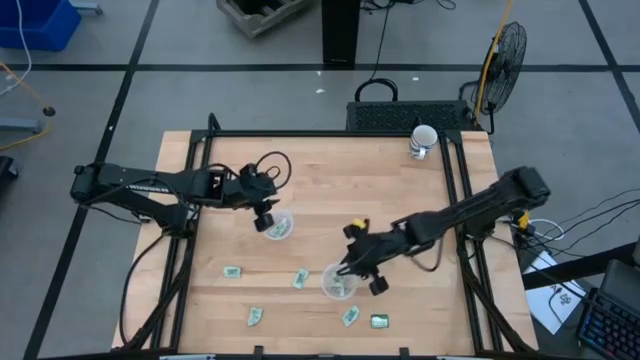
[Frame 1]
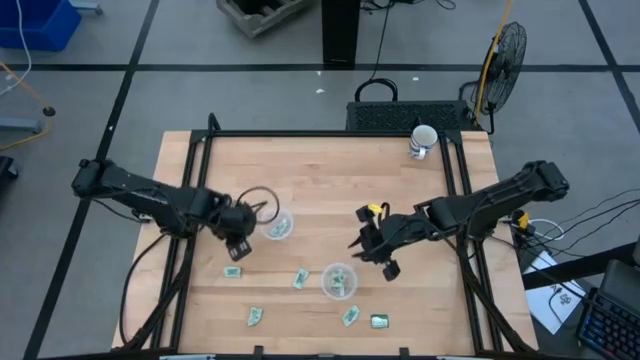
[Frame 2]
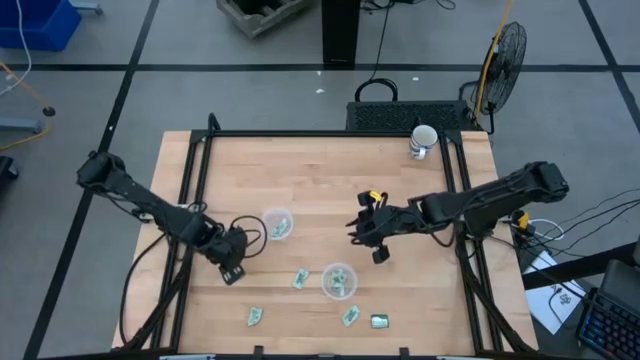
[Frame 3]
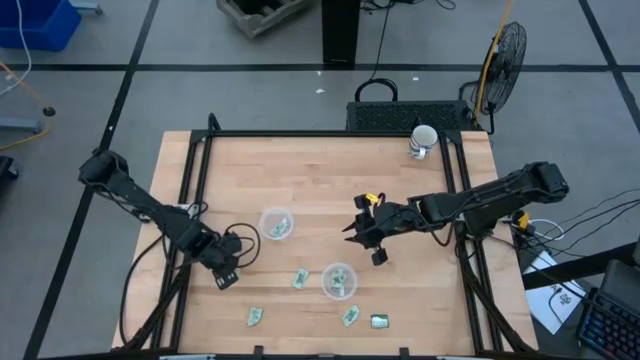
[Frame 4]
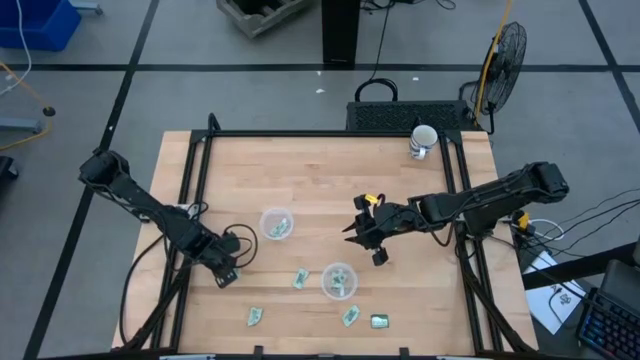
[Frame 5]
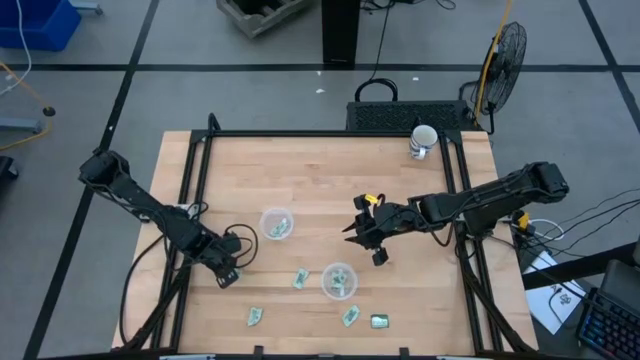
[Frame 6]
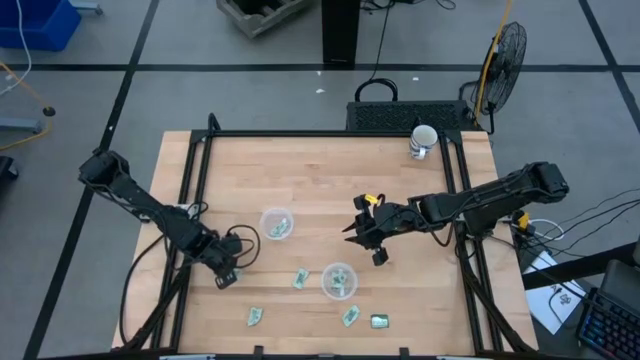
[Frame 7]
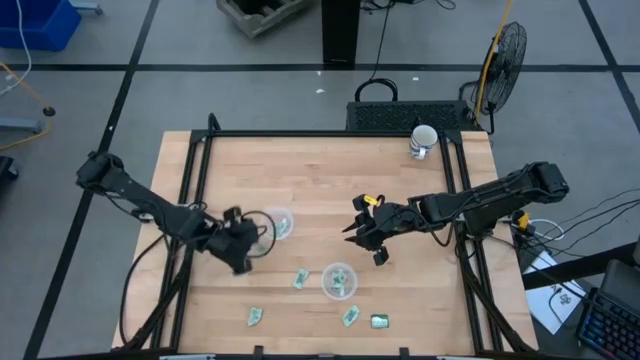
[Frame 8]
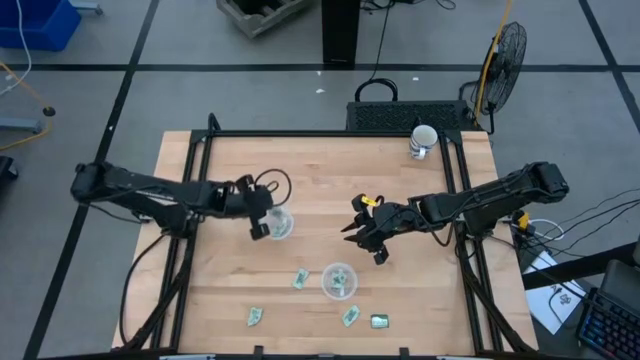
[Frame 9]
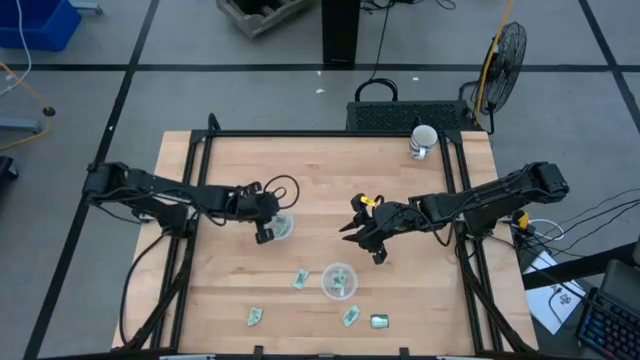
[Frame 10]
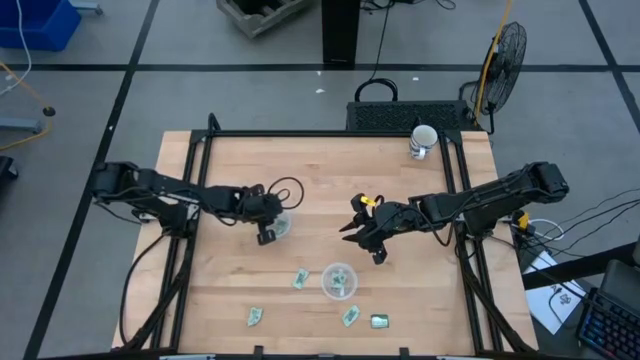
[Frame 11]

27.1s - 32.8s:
Task: Pick and place items into bin
Put the white stevia packet into the top transparent bin

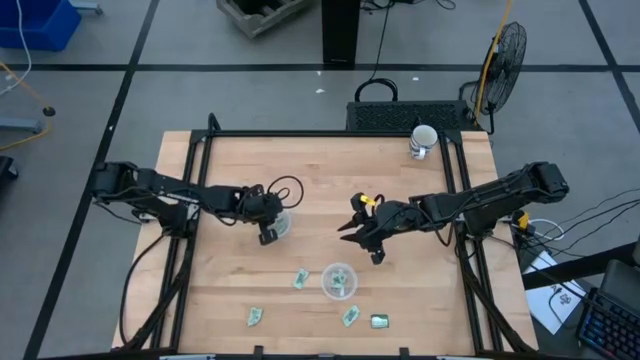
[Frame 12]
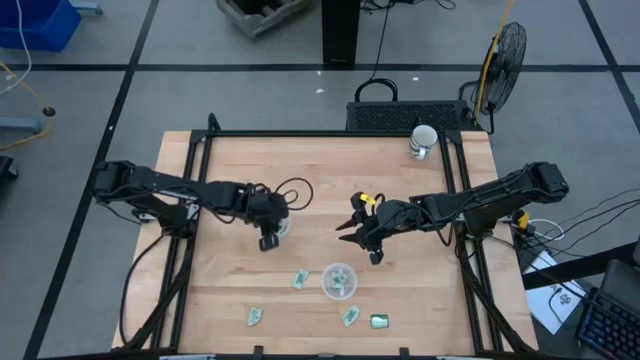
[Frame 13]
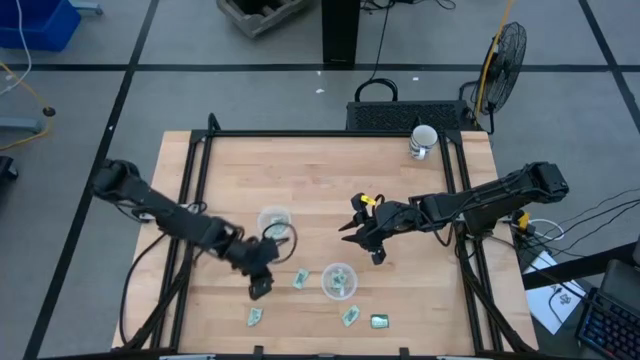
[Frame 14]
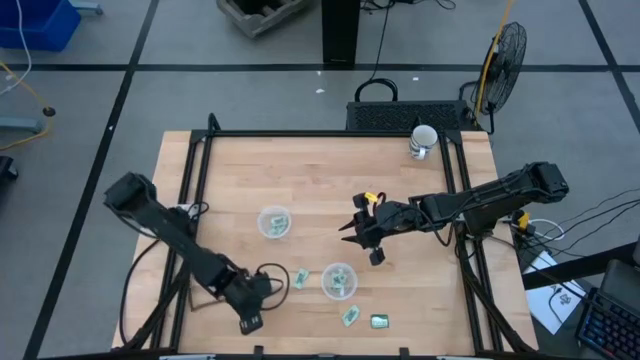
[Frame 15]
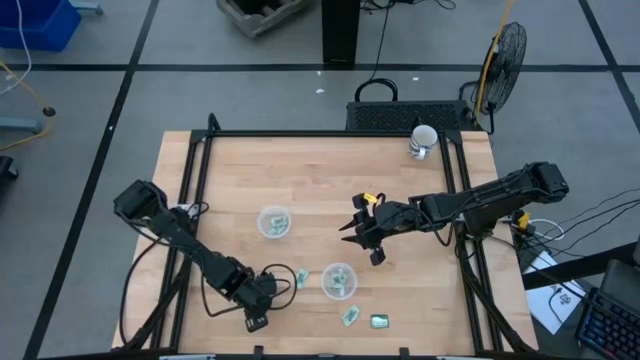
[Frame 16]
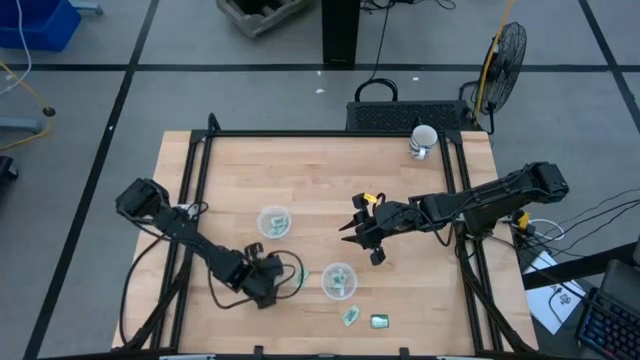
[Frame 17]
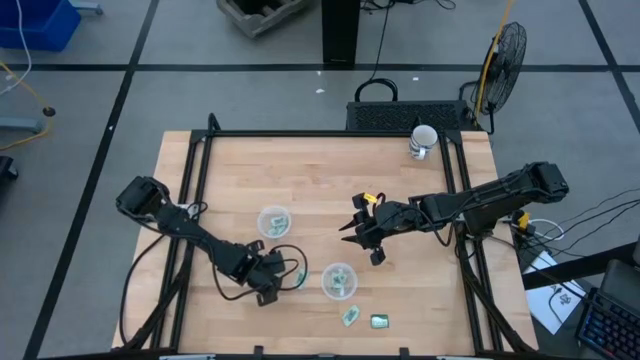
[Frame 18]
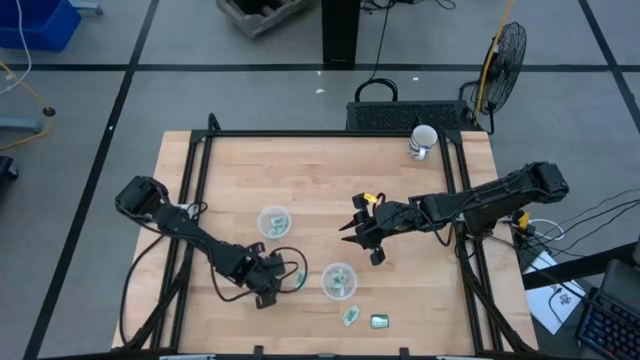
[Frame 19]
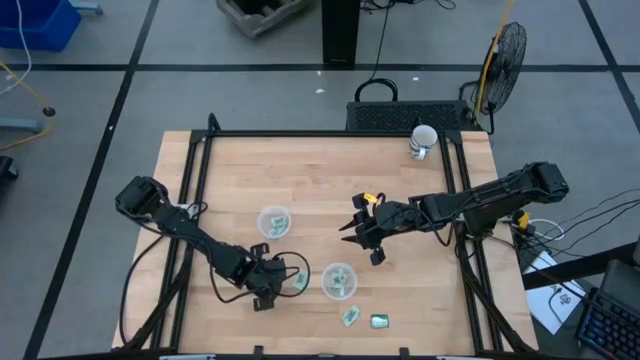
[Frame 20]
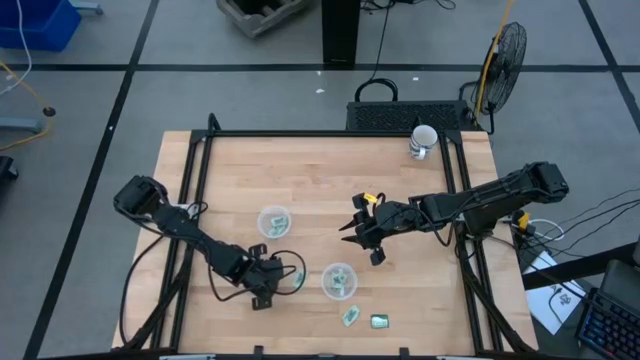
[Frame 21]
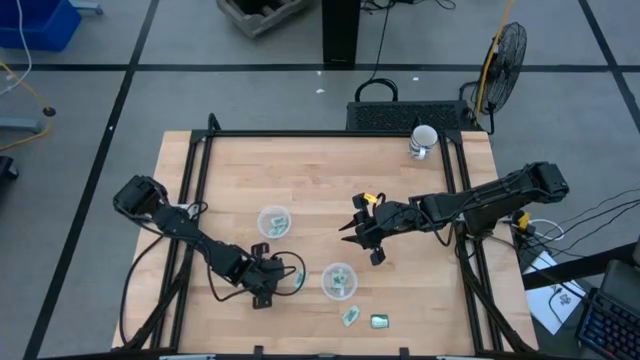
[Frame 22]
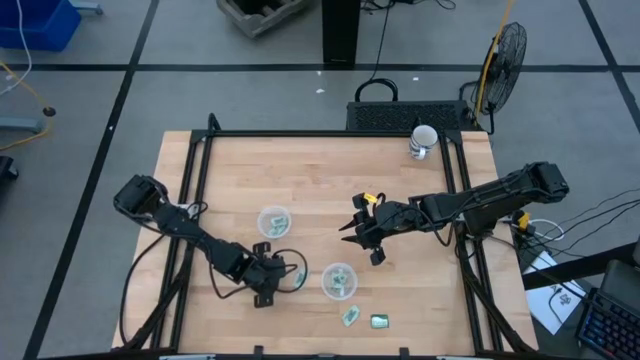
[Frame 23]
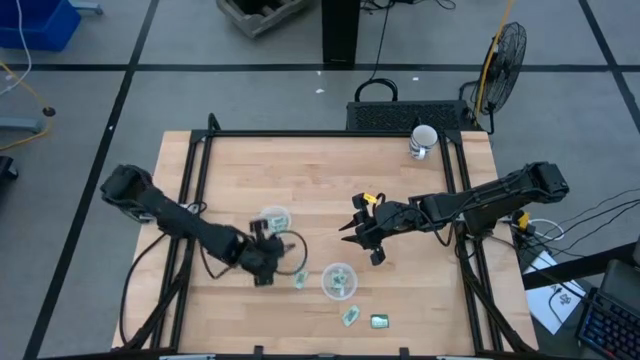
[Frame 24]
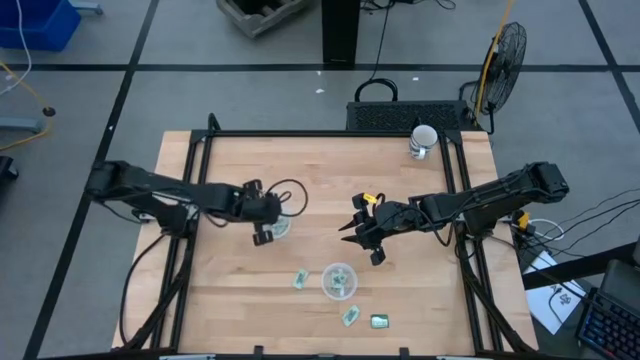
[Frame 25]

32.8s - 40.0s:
Put the white stevia packet into the top transparent bin

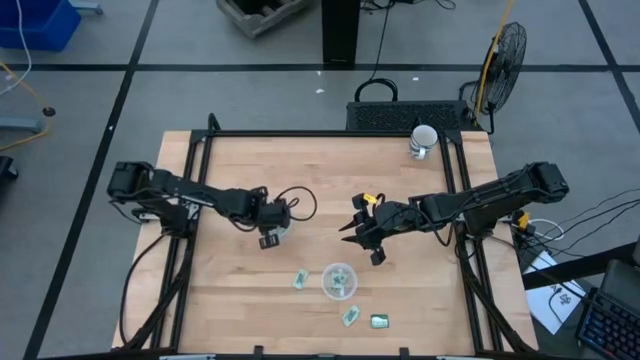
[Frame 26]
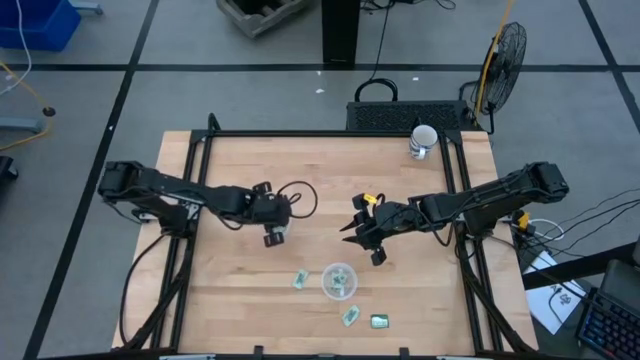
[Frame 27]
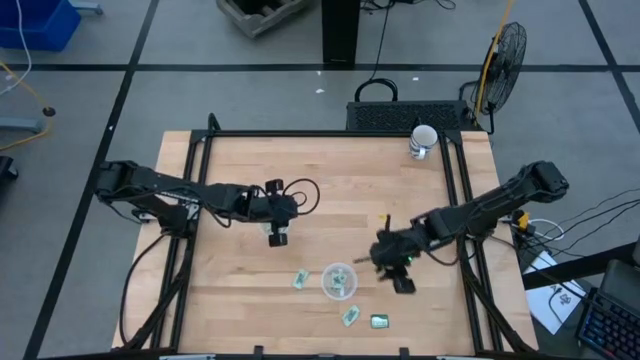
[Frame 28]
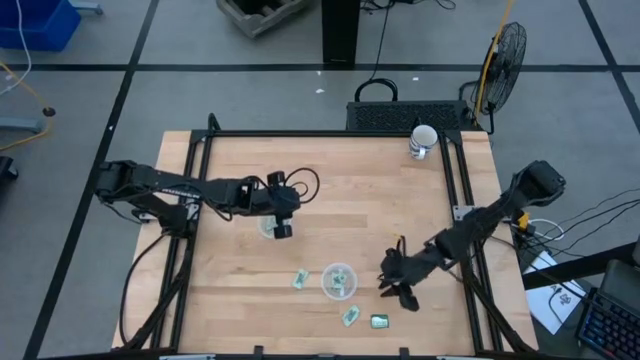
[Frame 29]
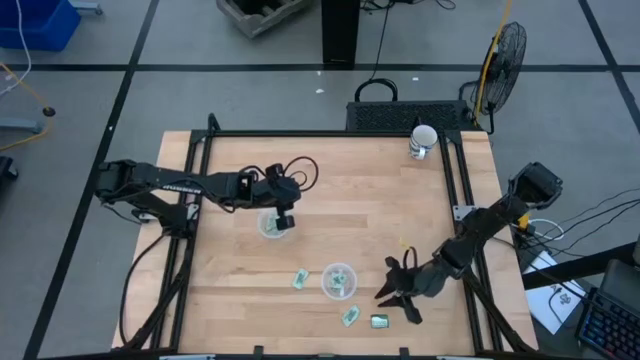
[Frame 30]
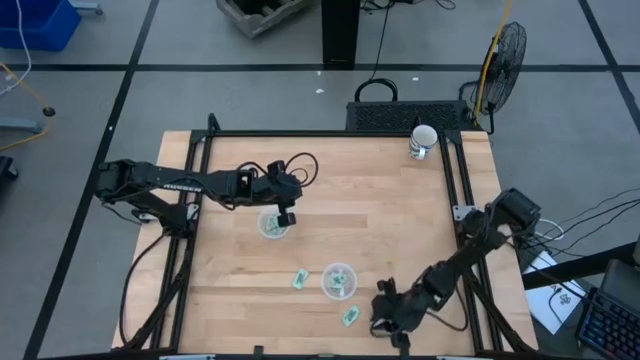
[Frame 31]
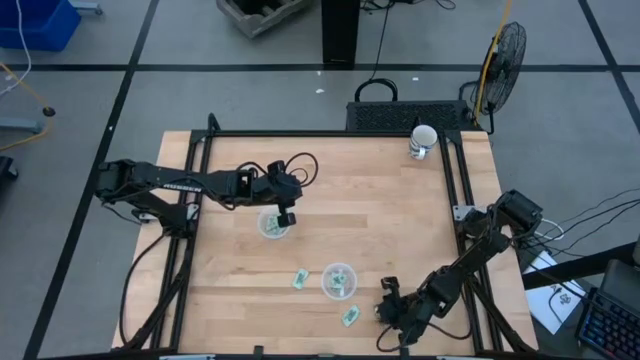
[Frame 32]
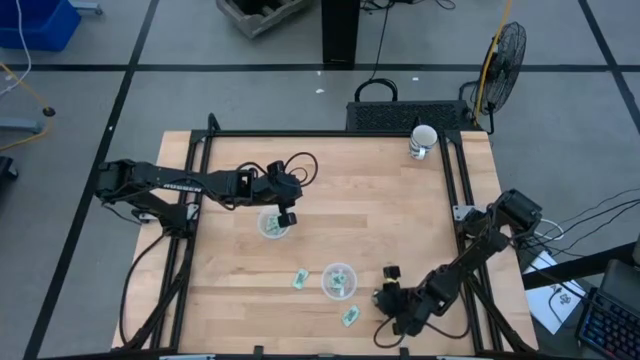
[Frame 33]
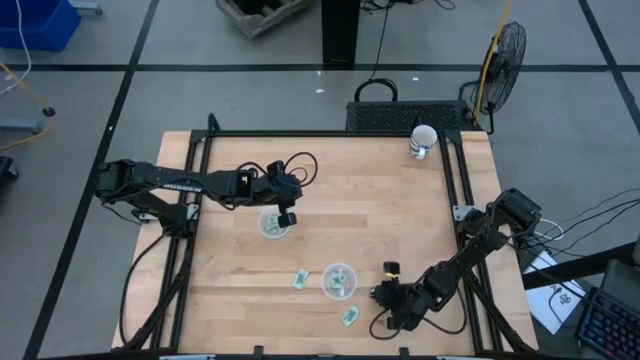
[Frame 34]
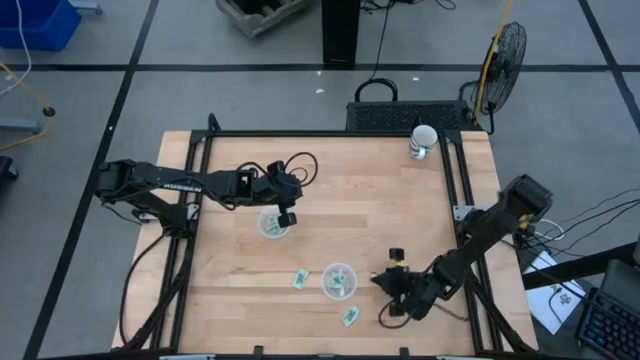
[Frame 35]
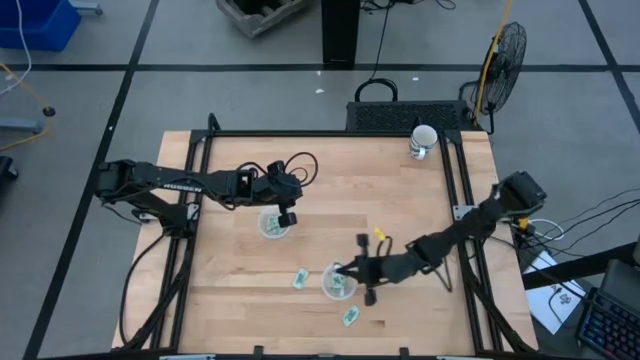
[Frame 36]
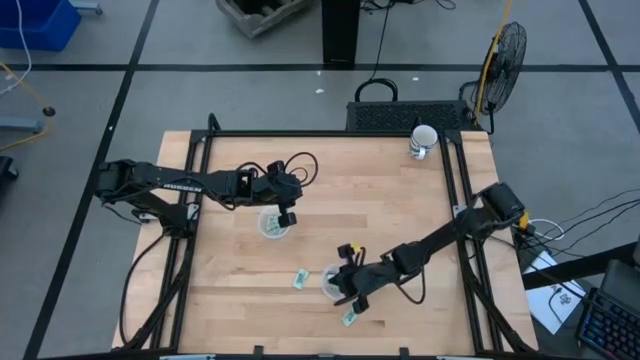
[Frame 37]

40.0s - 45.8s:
Put the green stevia packet into the bottom transparent bin

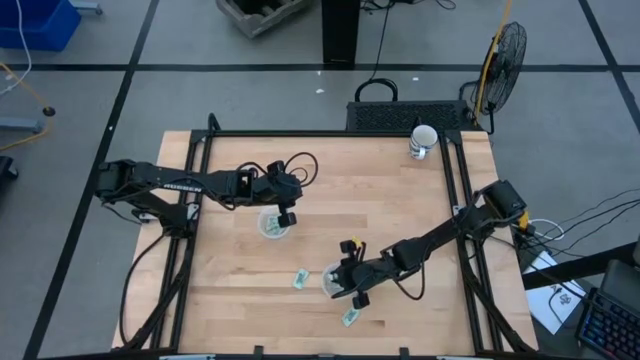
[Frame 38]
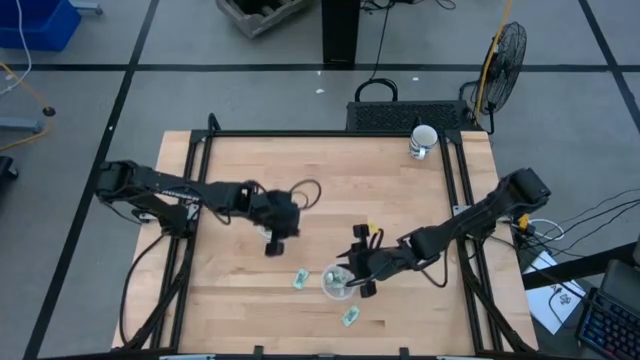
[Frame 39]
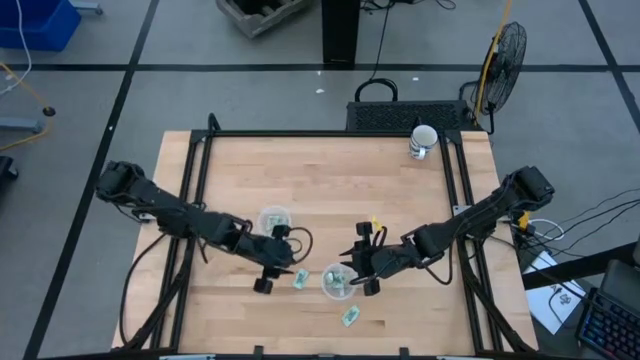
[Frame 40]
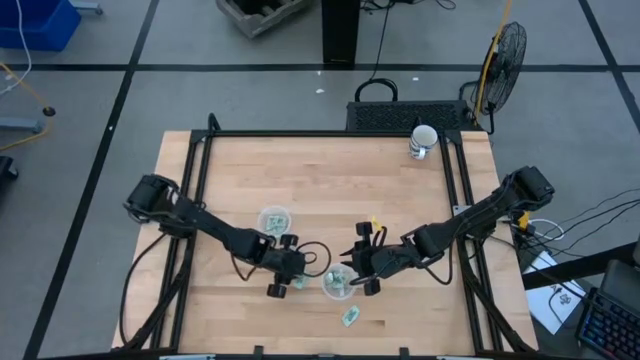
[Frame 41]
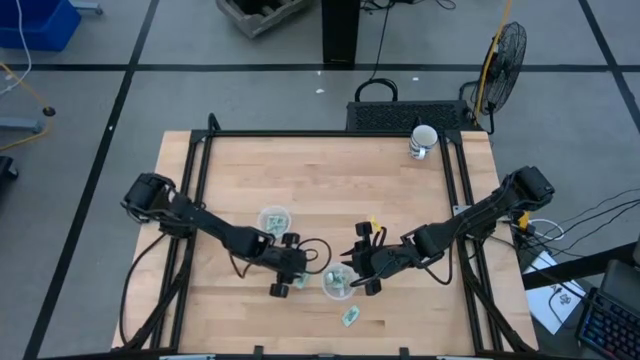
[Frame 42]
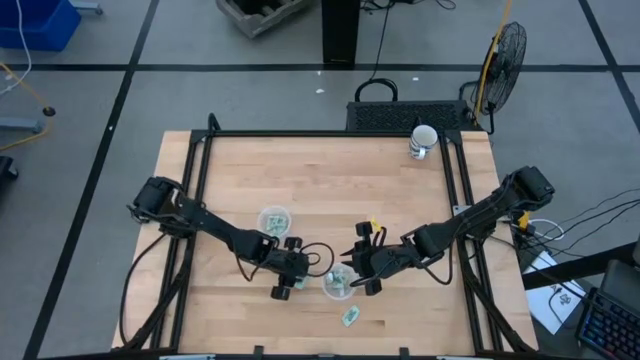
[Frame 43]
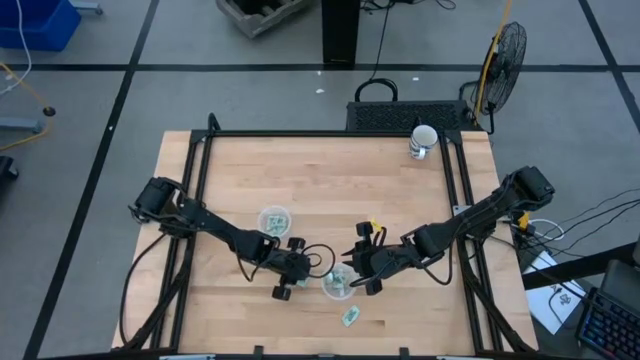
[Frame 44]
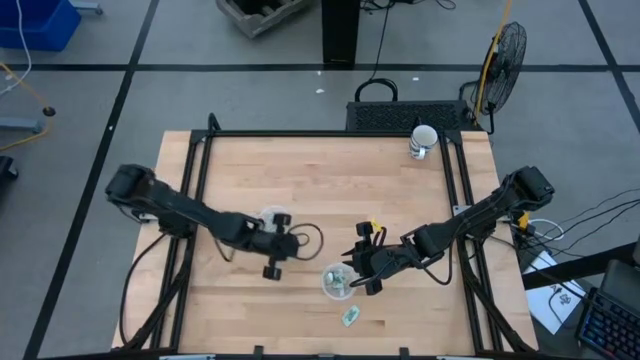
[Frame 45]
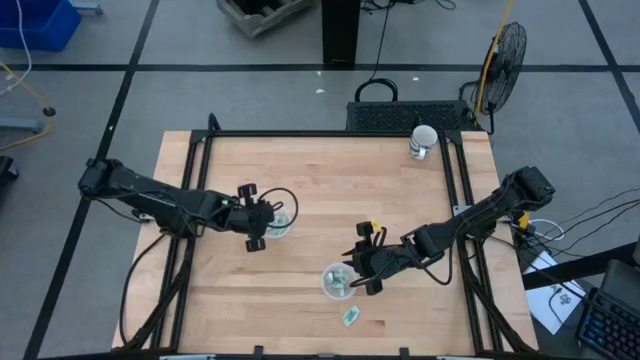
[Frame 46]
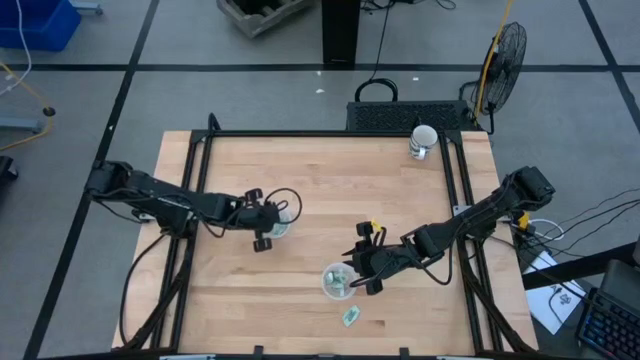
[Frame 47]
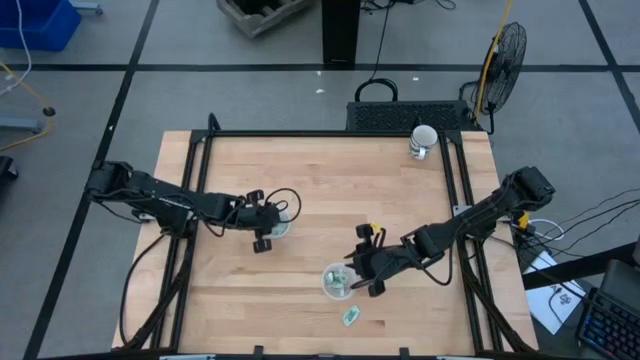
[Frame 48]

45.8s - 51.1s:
Put the white stevia packet into the top transparent bin
